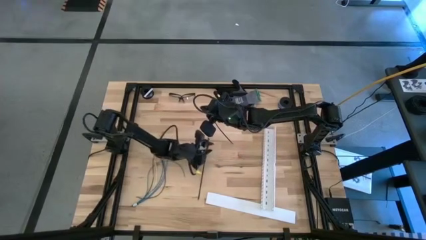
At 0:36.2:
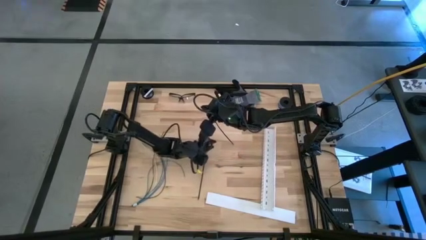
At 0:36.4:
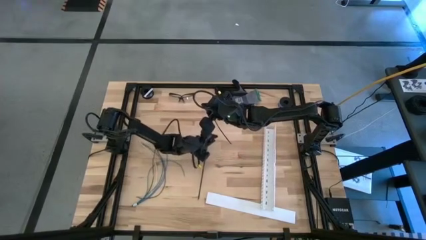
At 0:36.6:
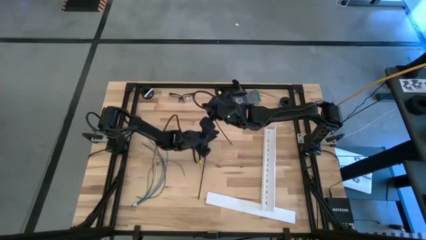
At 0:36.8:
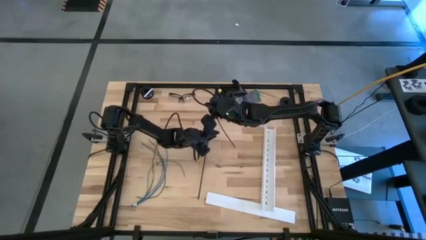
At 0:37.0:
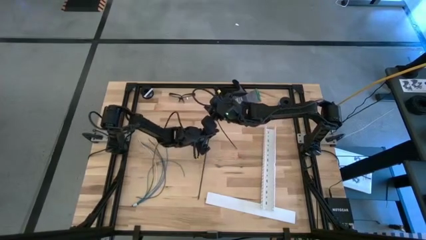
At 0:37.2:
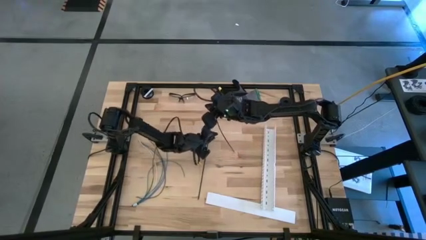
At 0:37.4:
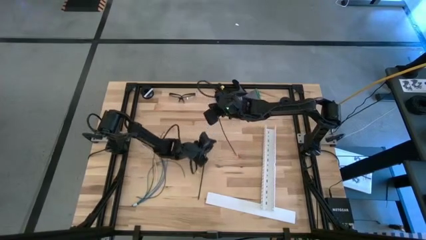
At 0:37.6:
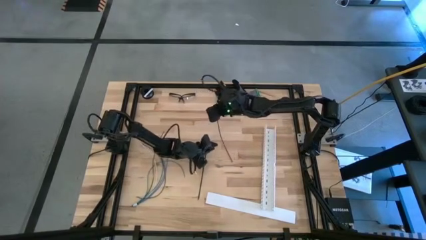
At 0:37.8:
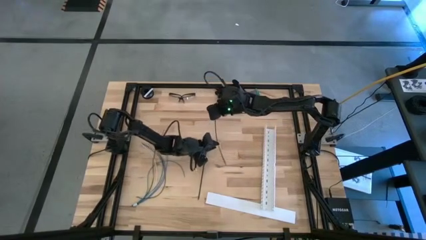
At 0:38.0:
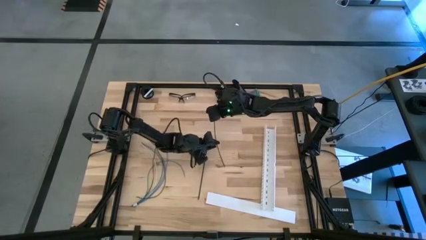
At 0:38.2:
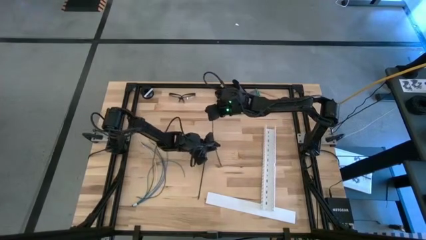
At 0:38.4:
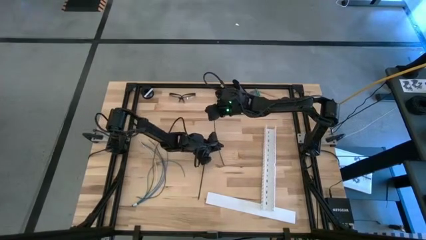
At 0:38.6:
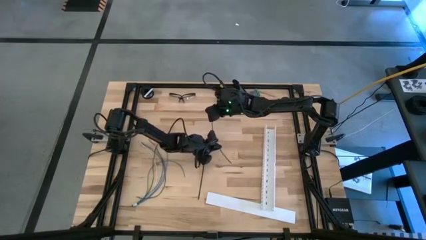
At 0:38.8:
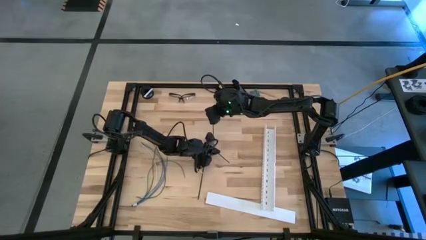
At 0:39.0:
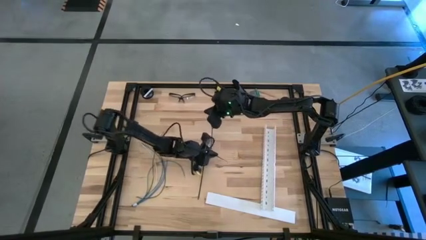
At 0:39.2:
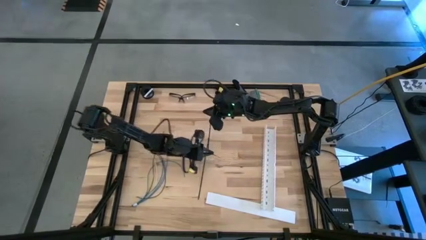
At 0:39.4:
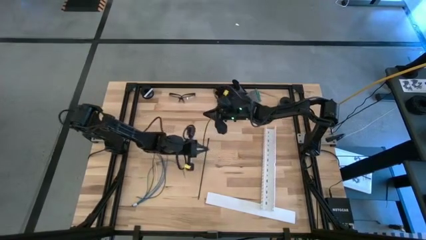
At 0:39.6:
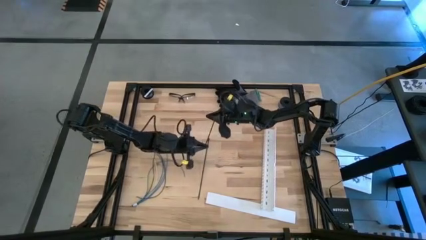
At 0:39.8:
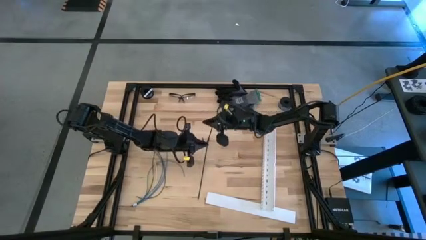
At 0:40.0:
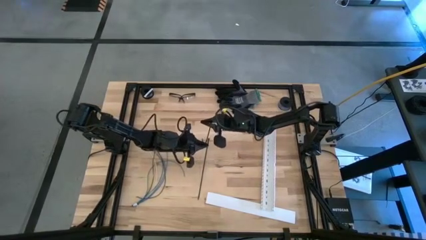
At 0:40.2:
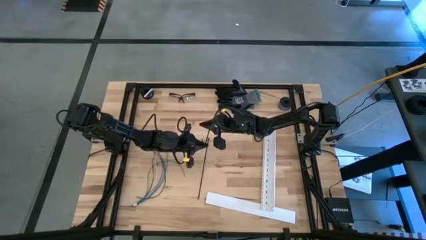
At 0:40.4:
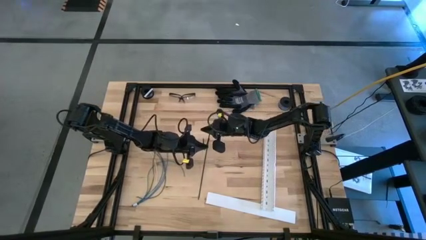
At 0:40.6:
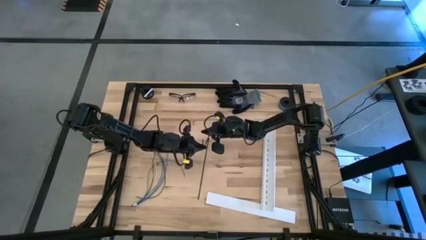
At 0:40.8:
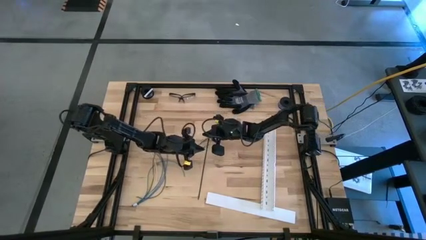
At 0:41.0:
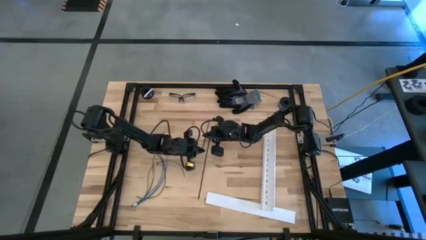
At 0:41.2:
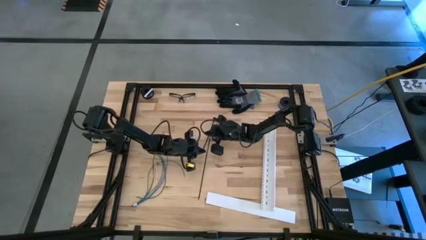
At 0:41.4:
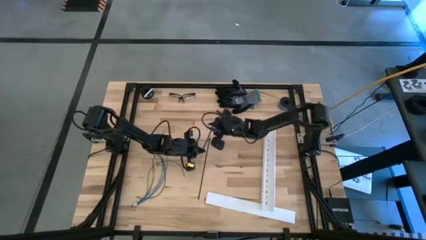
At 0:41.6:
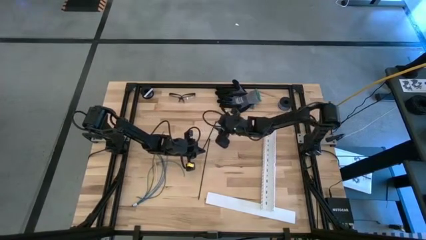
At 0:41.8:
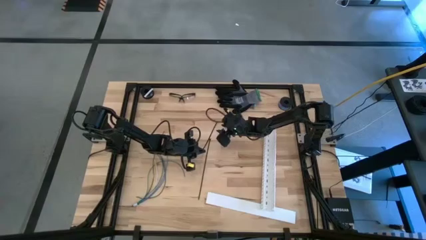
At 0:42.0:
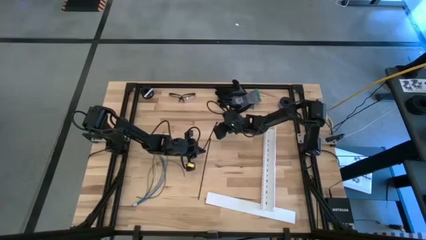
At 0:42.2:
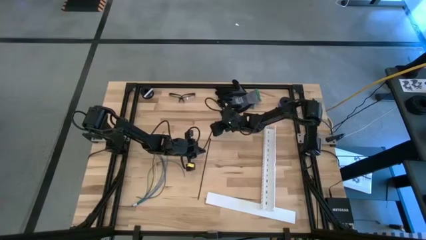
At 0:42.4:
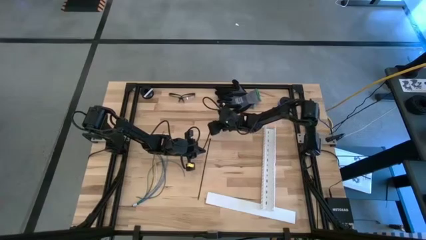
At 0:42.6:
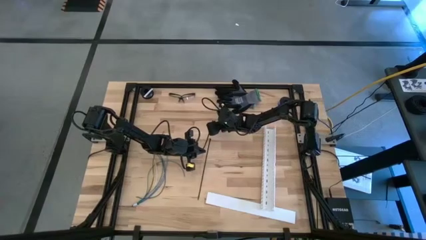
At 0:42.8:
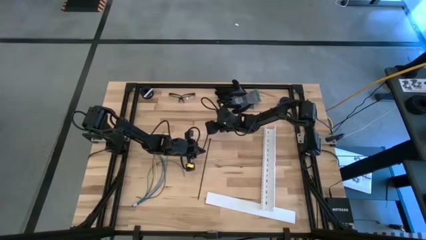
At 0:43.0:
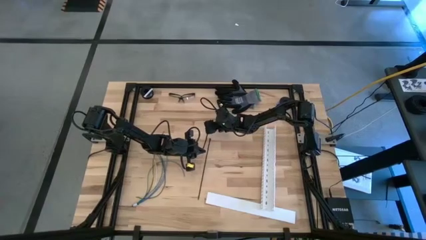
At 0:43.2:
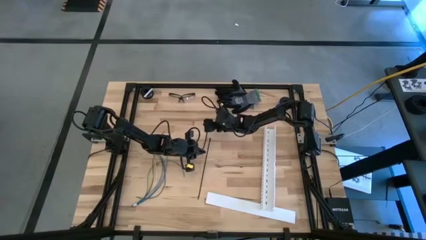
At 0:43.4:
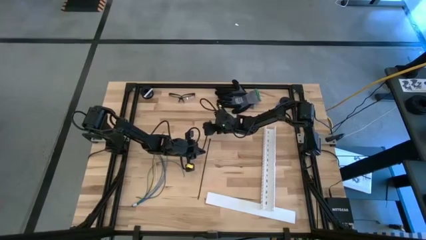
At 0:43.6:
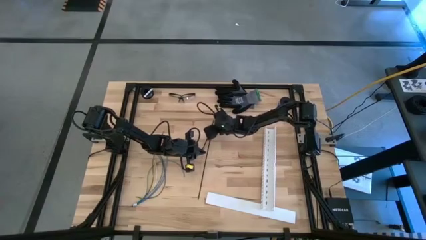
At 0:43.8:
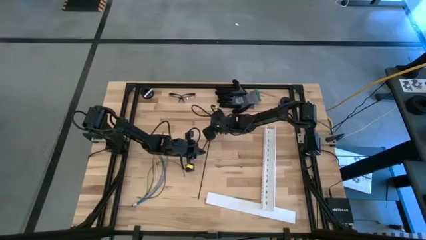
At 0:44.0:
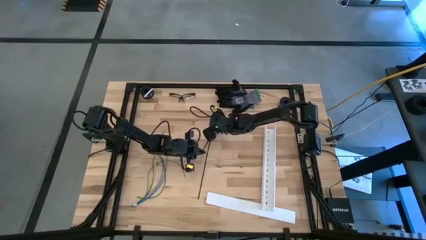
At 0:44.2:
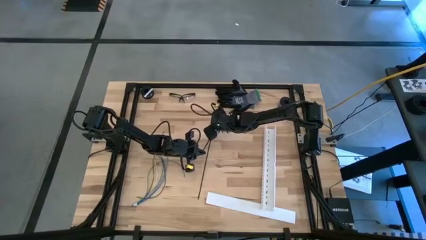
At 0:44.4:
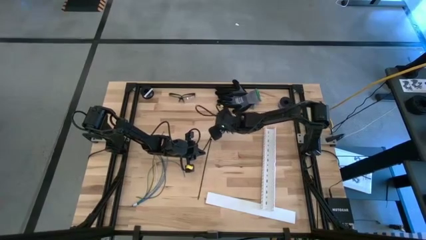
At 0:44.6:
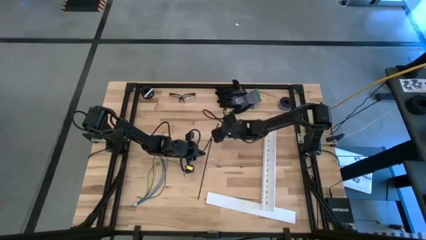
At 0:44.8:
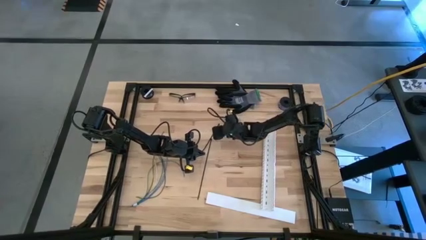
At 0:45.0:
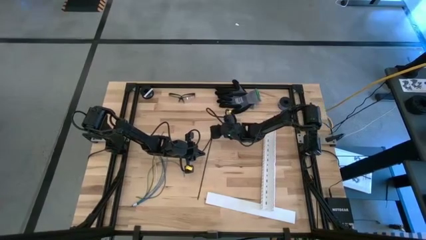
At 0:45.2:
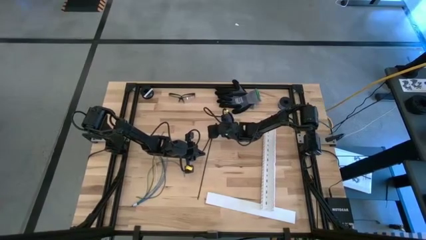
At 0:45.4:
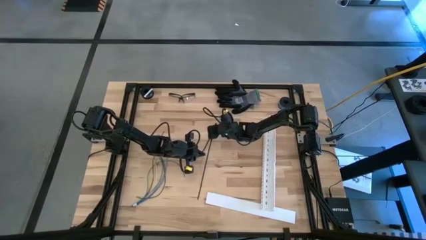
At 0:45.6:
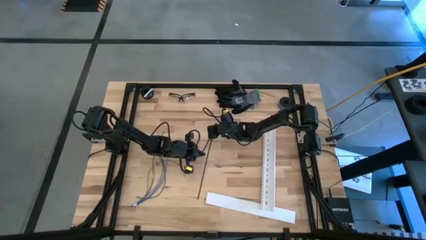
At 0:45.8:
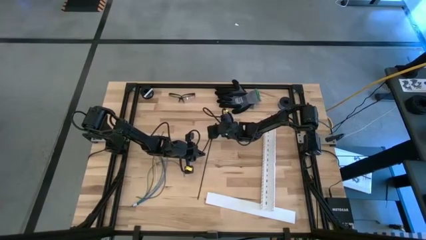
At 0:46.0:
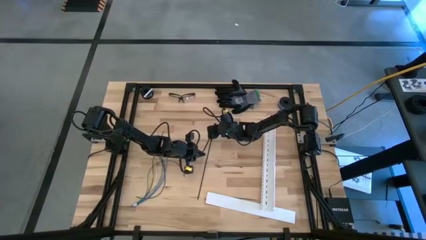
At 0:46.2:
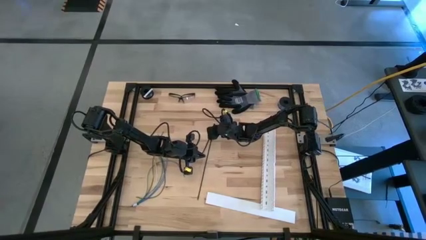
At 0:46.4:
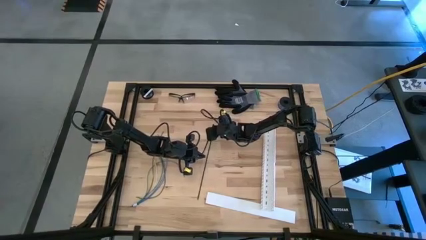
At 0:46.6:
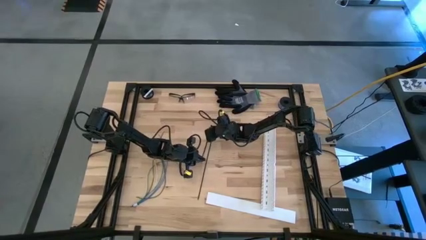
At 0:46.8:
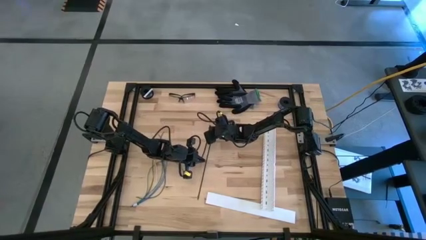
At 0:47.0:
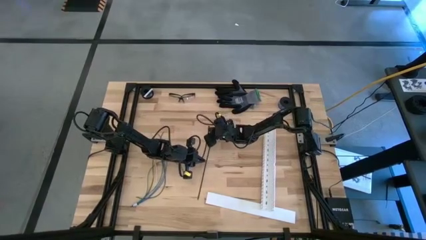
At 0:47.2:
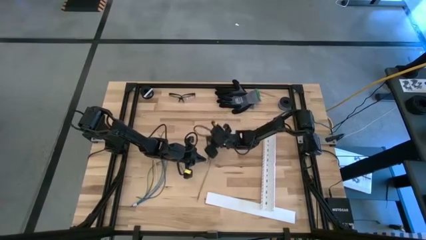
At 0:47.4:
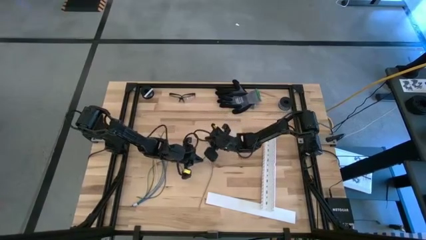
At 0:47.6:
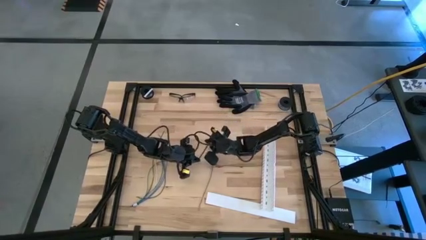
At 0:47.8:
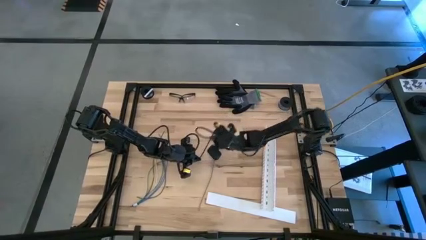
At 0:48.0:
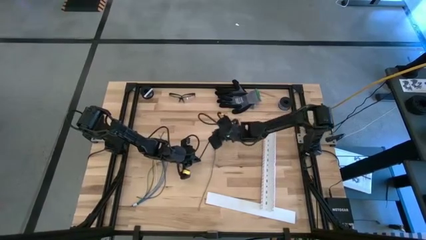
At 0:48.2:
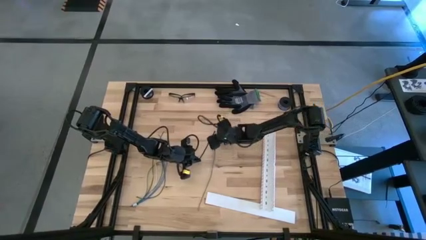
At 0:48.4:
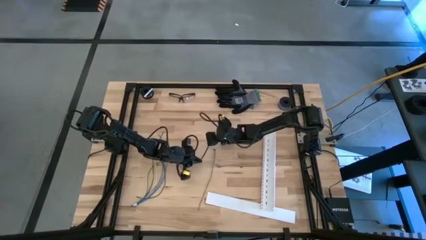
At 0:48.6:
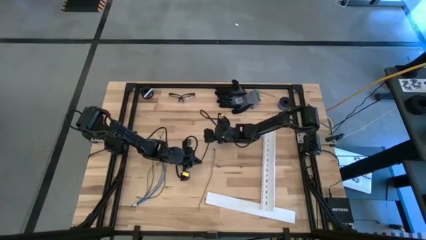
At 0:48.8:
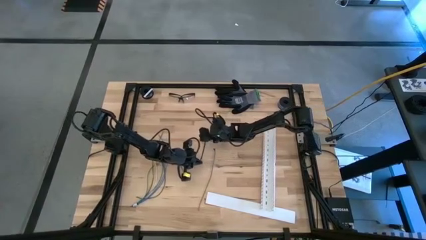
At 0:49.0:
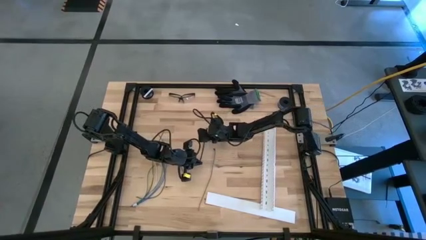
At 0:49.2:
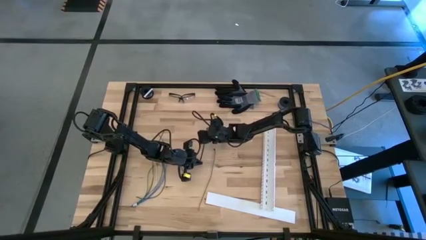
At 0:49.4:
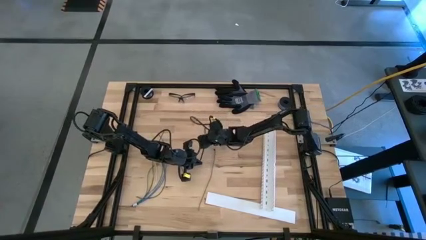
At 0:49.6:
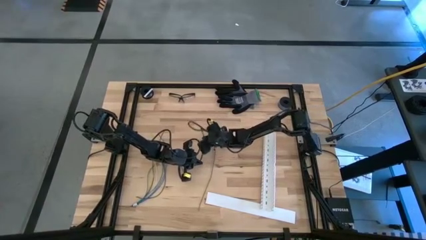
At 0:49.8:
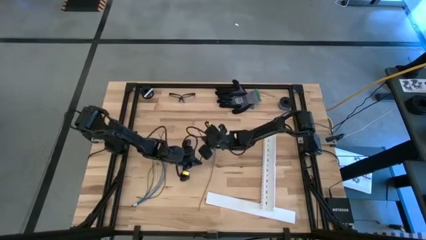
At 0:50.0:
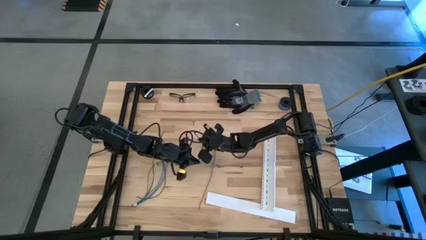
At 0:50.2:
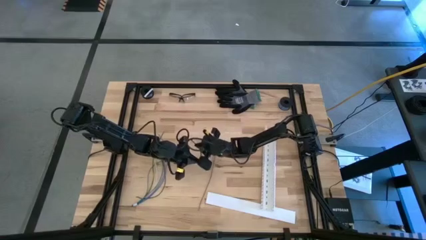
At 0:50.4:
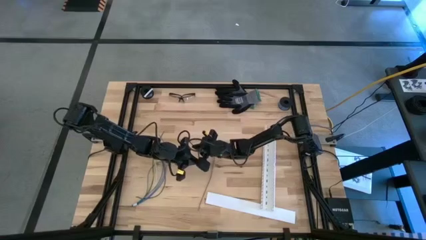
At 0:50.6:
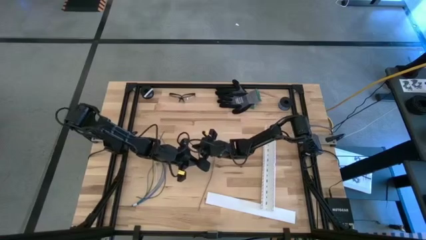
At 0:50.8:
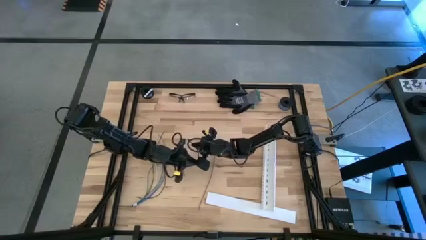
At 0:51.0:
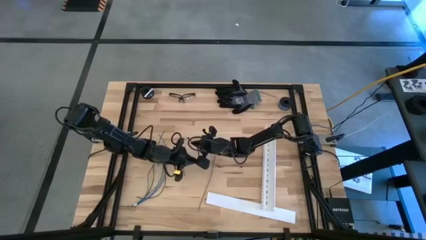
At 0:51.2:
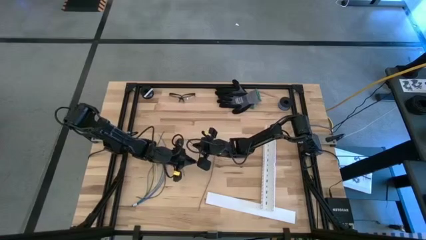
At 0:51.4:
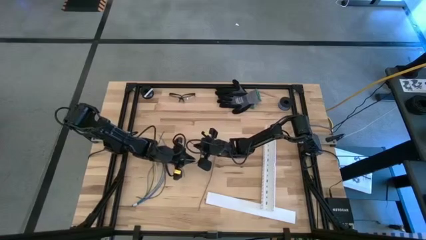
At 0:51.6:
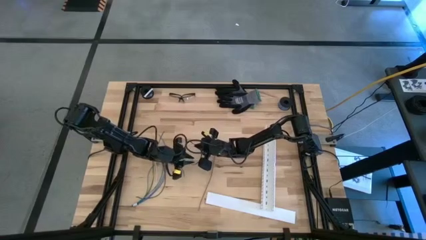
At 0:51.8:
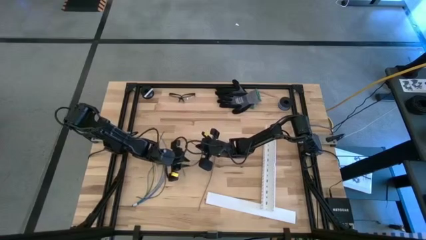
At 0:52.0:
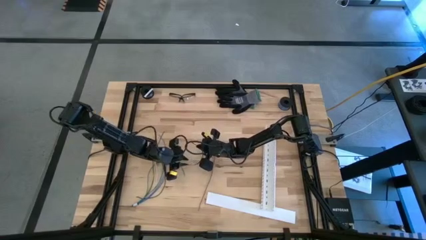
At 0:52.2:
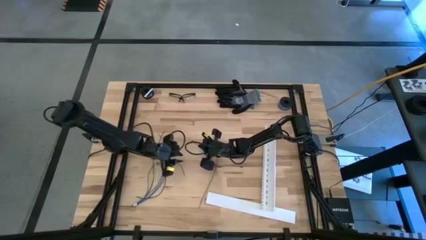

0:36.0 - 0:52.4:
Task: Ziptie cables
Wrap the cable wires with the black zip tie
